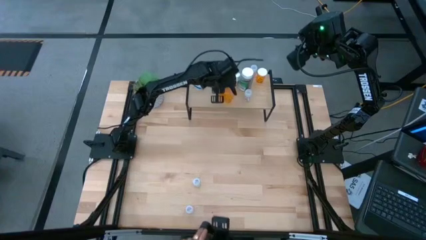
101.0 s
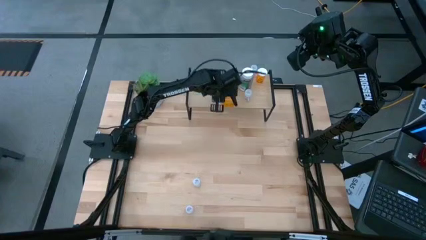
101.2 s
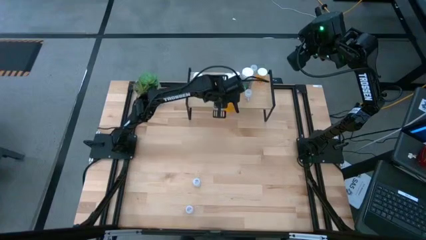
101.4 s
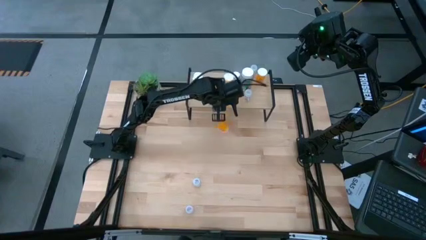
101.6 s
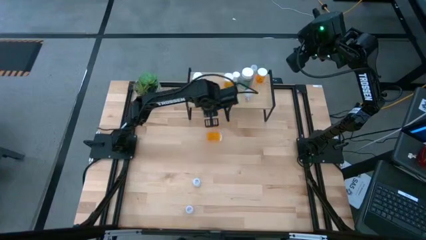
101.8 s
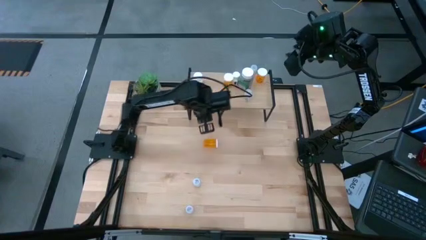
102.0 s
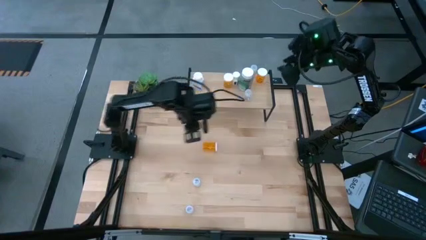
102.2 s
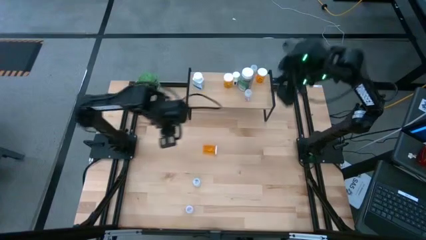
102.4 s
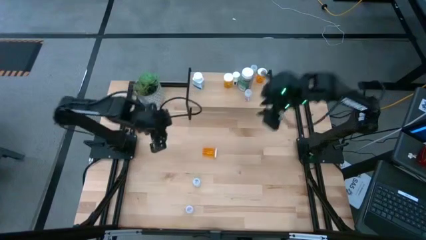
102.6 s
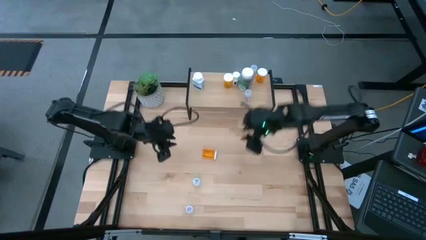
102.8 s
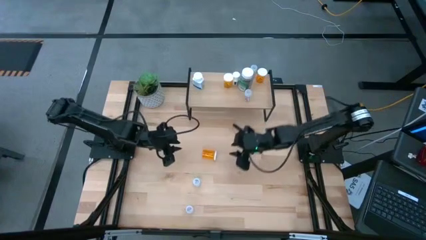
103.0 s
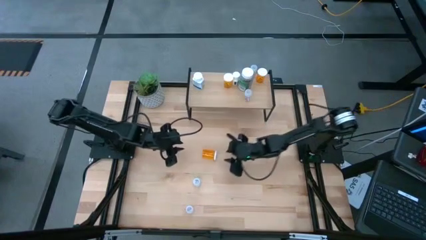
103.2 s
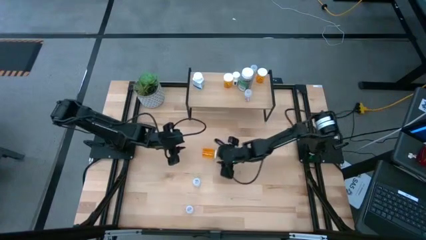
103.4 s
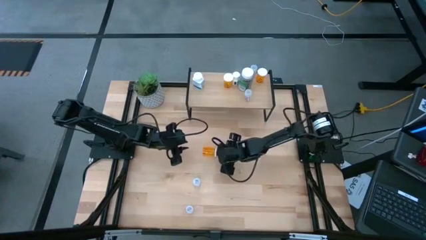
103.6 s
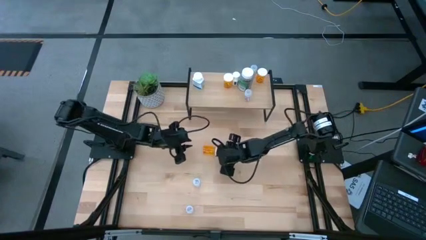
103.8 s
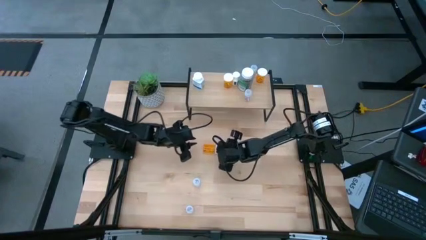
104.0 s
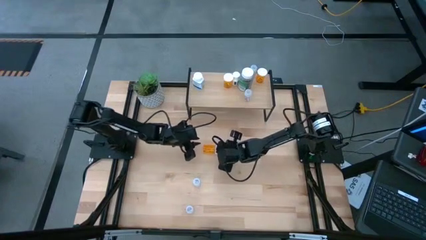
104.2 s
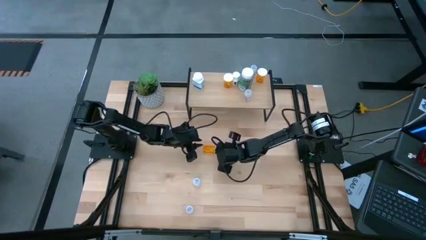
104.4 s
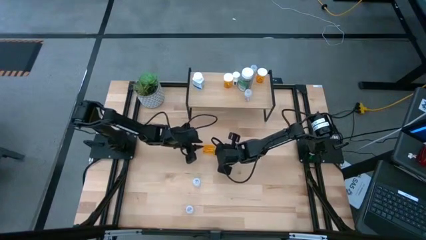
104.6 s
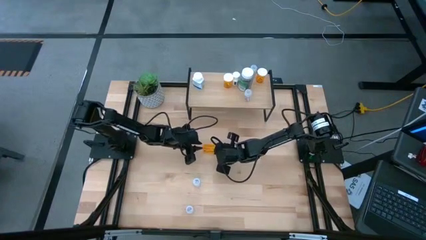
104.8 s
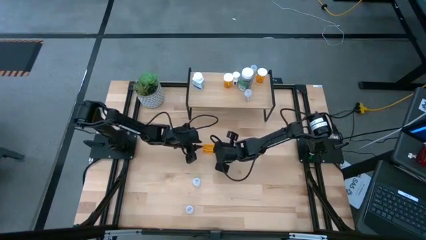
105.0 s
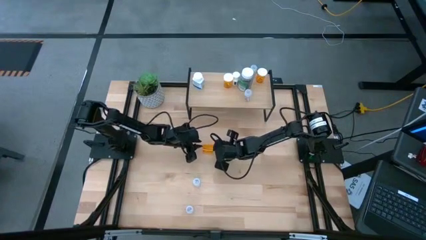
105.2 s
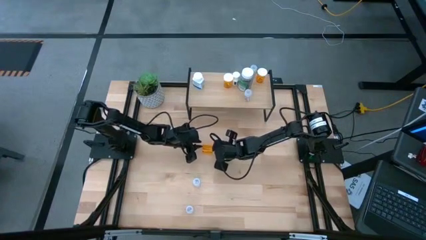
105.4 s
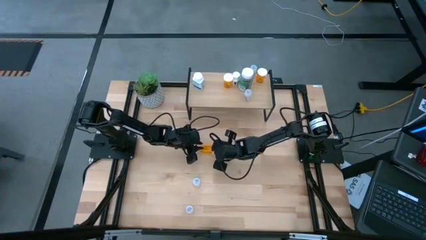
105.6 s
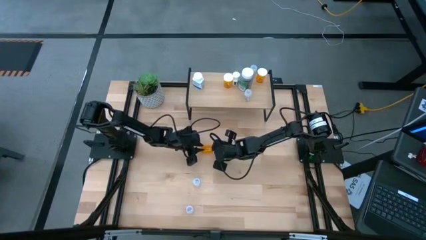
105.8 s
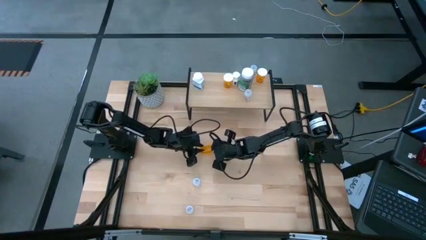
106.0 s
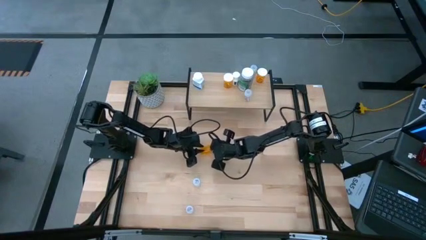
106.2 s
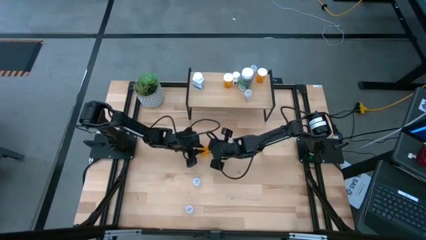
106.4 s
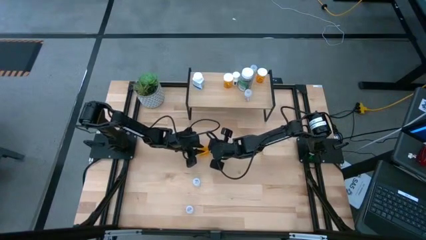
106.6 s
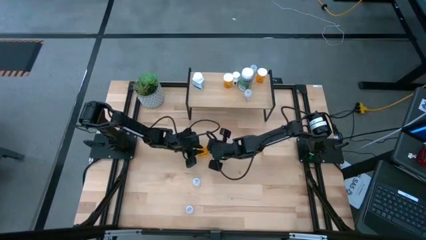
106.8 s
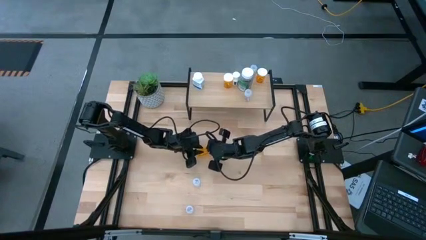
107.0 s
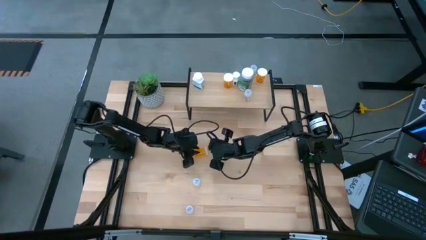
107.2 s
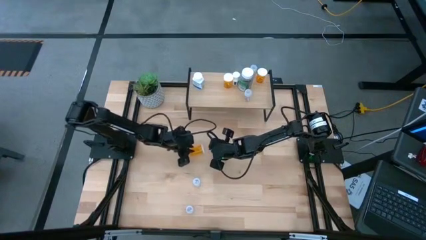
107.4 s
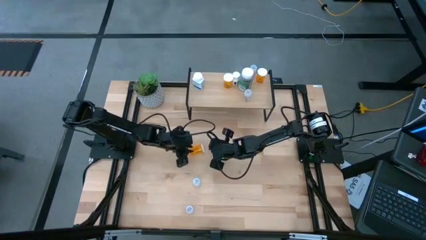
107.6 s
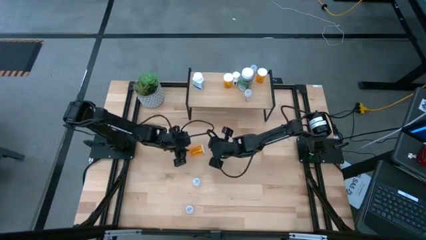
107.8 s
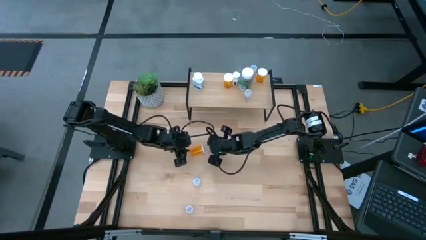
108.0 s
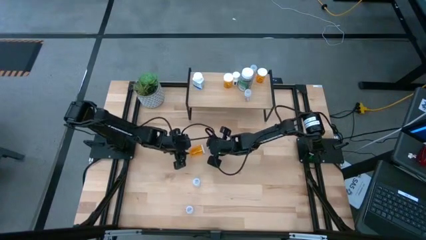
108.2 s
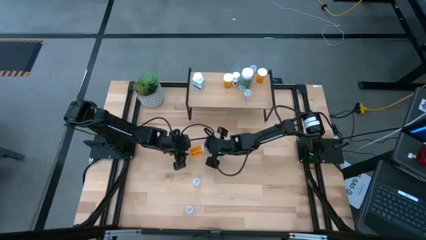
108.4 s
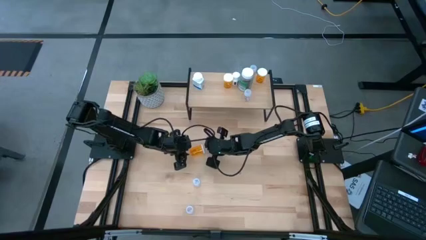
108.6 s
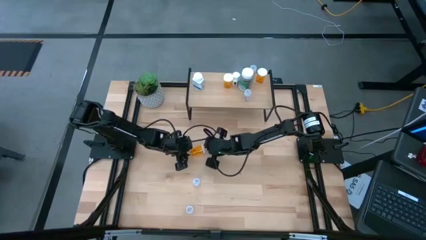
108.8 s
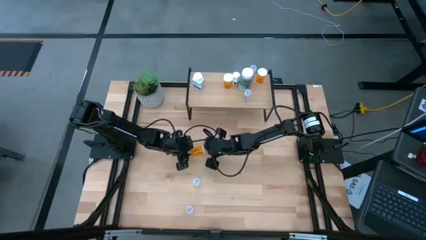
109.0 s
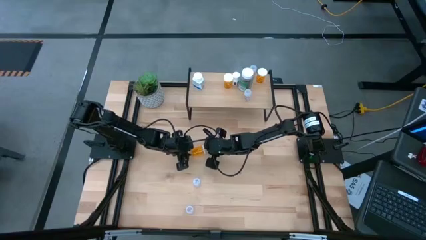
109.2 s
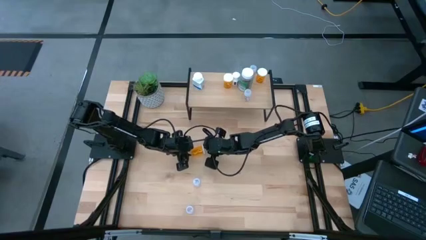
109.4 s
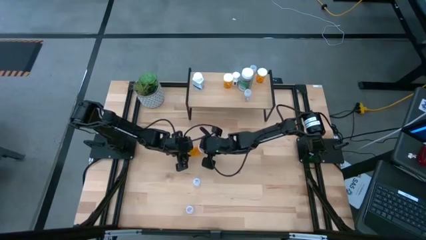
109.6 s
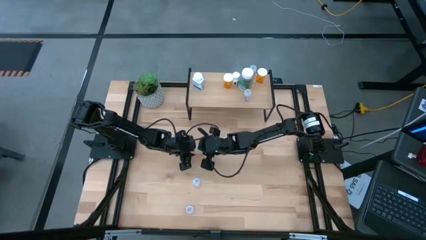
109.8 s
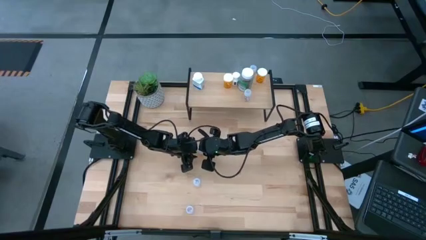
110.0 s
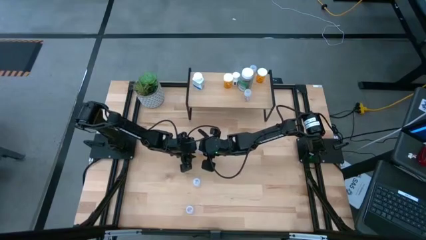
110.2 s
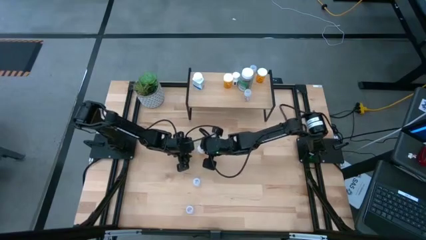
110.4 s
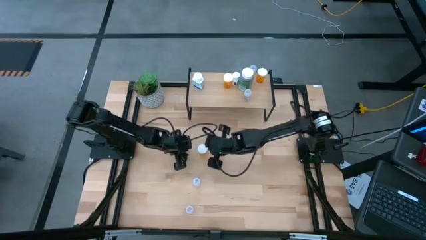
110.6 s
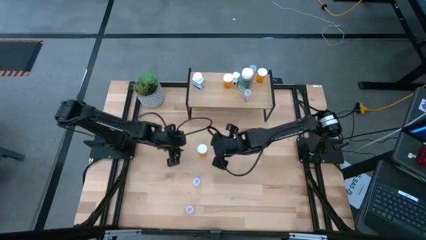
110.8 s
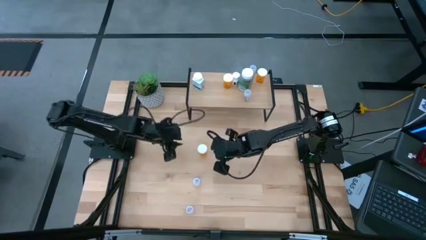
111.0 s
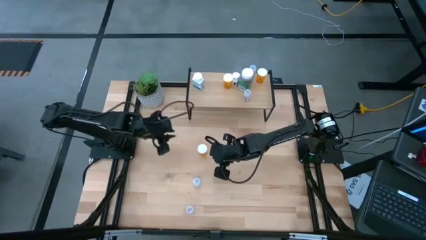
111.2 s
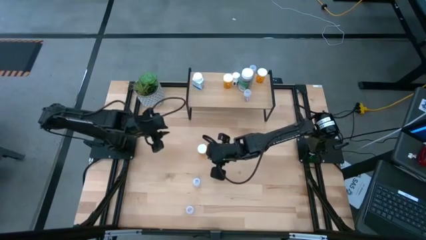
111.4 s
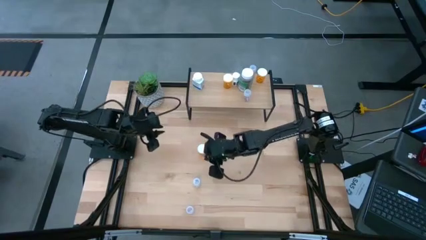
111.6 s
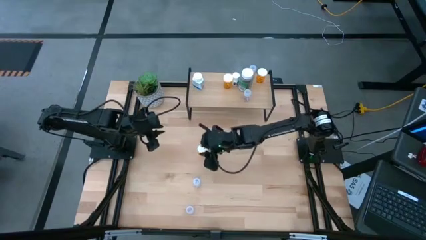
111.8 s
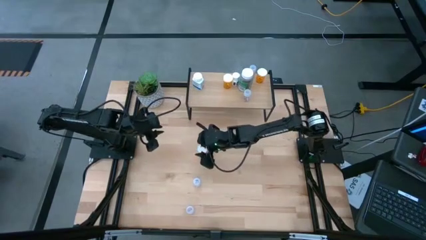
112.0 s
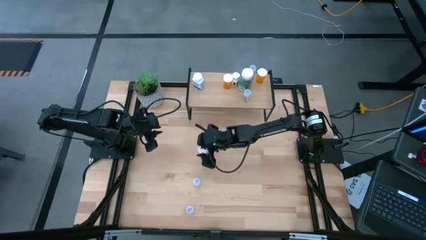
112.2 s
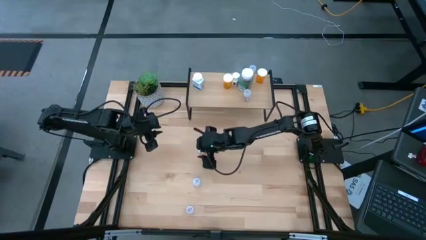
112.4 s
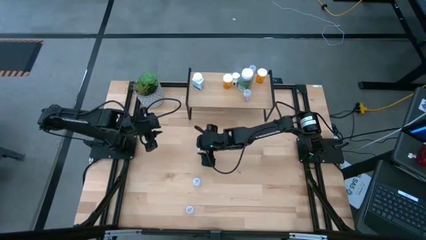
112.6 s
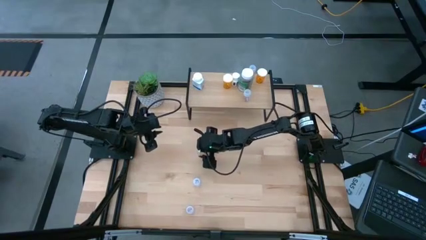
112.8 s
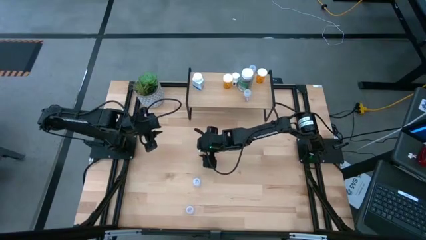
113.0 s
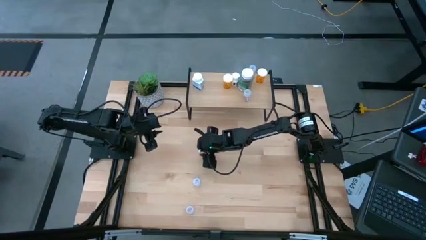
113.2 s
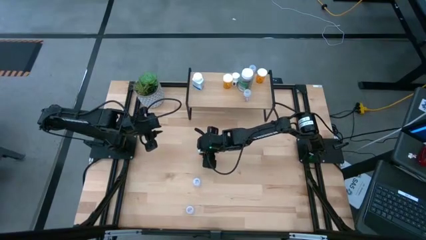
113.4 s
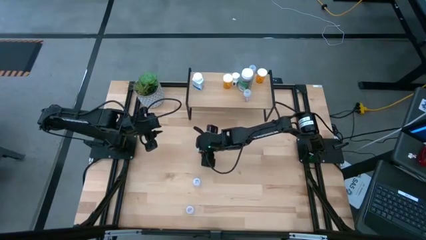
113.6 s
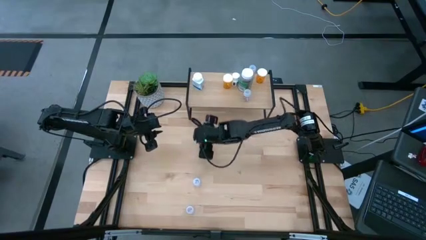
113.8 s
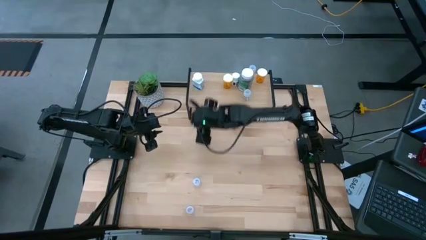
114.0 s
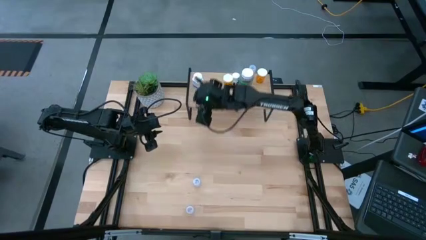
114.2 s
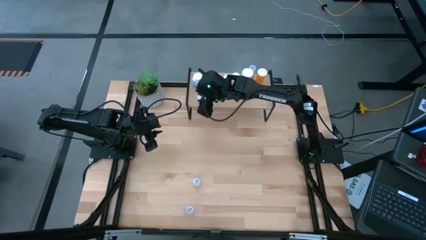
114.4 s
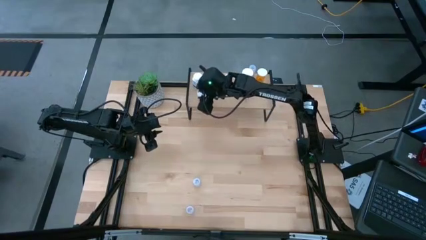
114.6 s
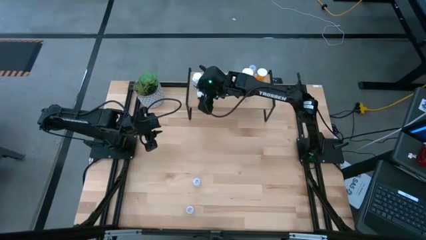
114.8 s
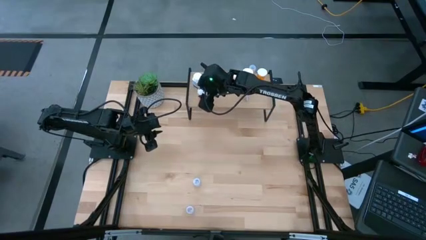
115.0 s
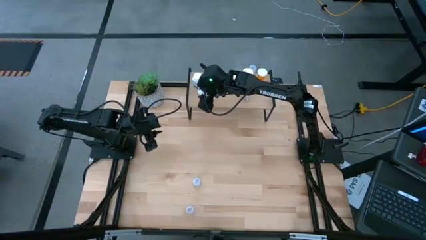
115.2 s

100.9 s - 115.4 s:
Task: Pick and place medicine bottles onto shelf by color
Put the orange pill bottle on the shelf

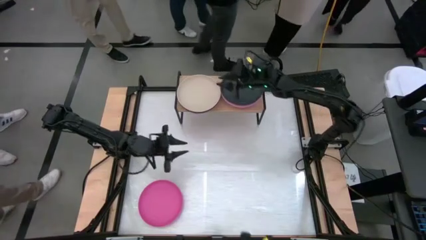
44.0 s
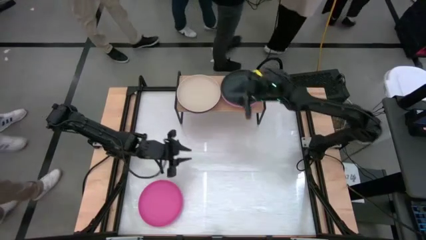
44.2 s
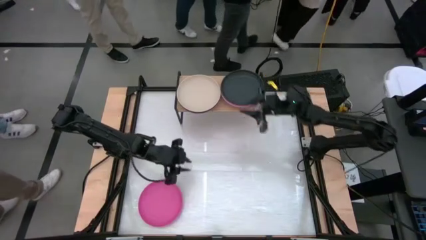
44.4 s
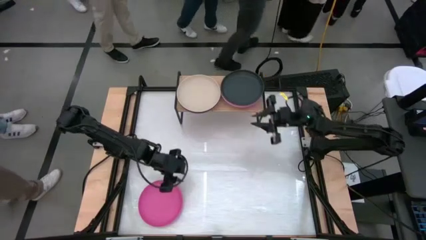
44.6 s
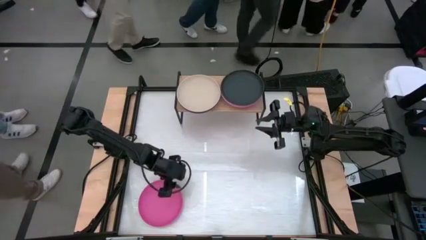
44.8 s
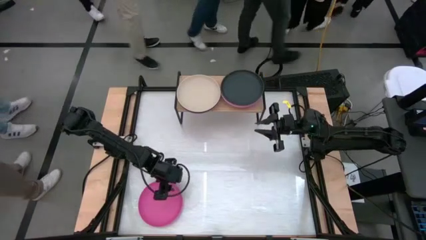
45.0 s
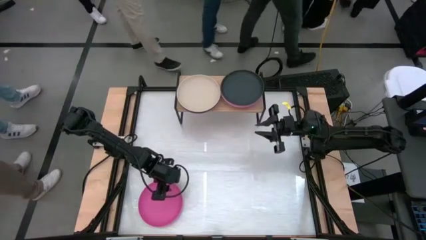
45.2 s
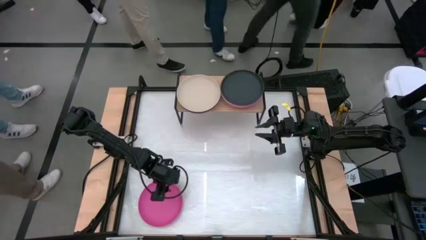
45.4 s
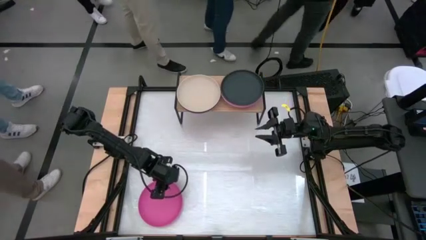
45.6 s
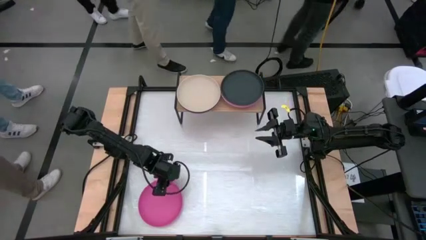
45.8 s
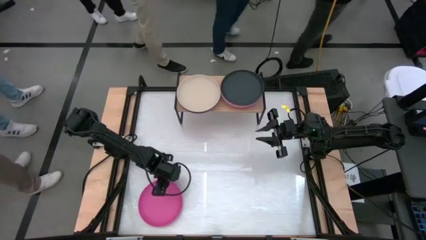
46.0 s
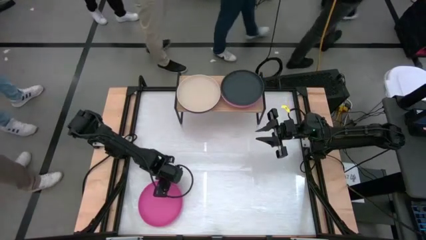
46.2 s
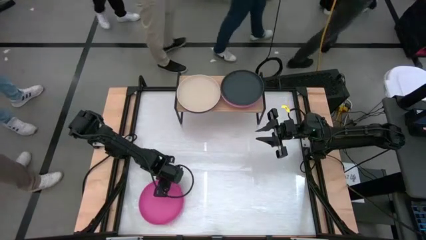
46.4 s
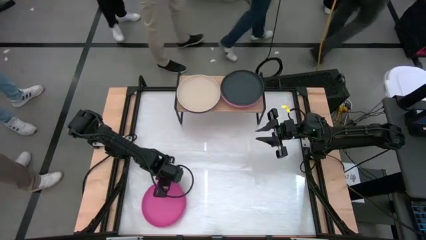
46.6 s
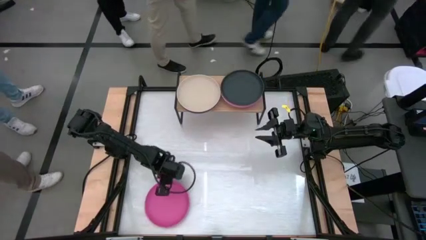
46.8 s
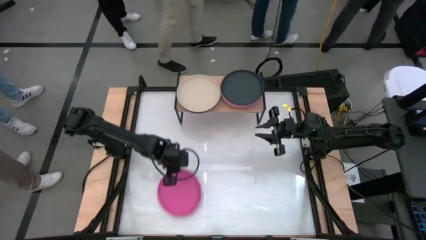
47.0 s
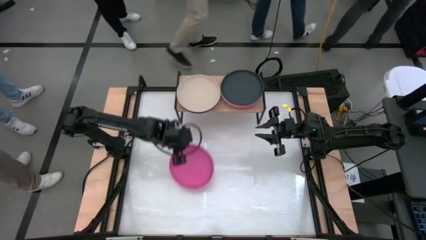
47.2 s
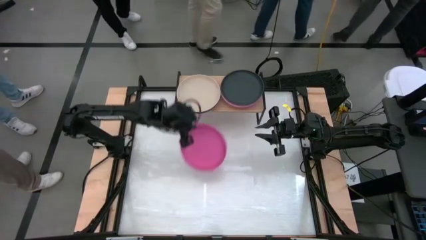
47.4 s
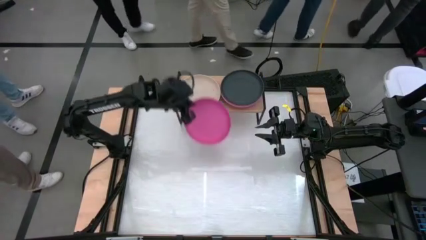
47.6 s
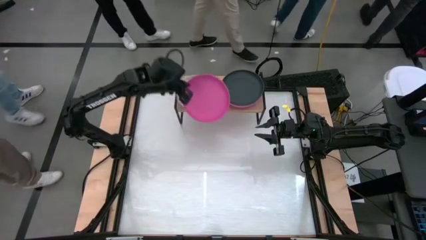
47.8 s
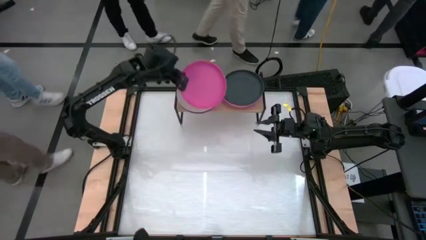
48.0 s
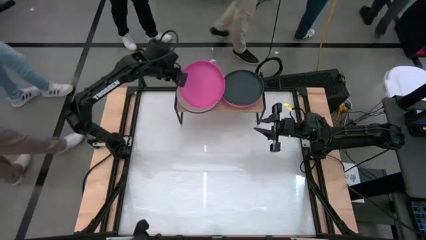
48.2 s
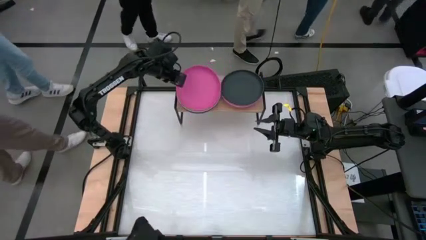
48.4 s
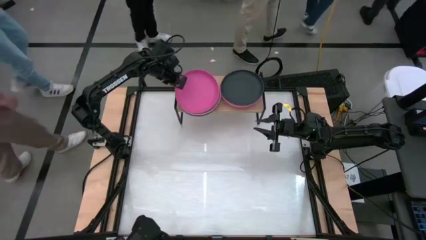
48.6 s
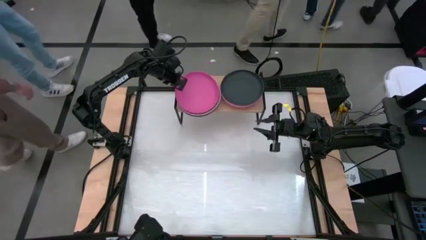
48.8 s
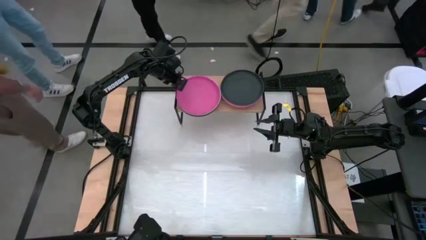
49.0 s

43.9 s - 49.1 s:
Task: Place and stack plates onto a shelf
Stack the pink plate on top of the white plate on the shelf
